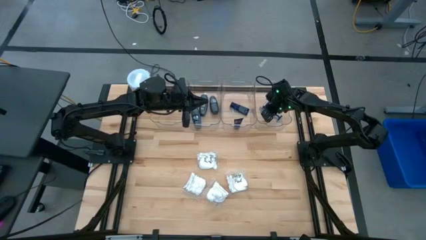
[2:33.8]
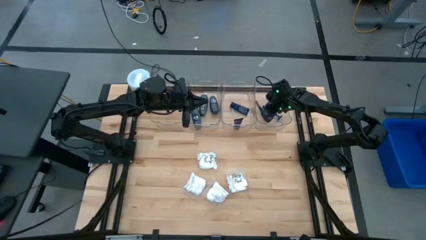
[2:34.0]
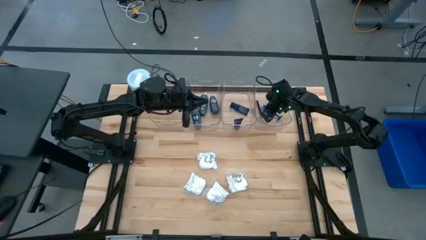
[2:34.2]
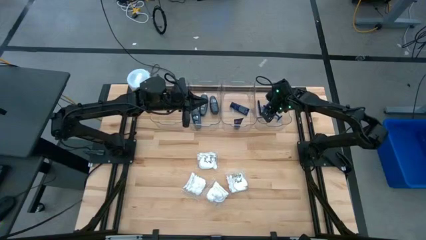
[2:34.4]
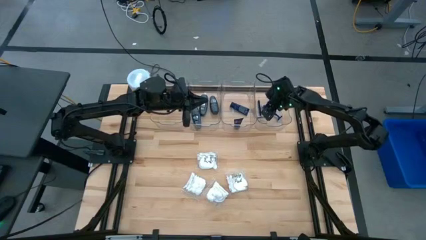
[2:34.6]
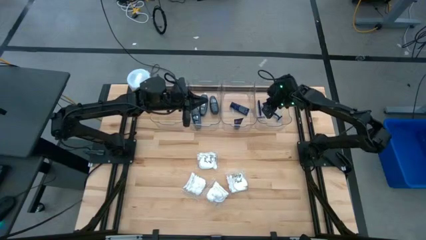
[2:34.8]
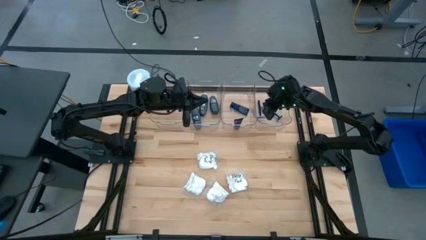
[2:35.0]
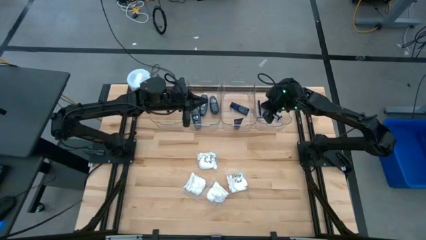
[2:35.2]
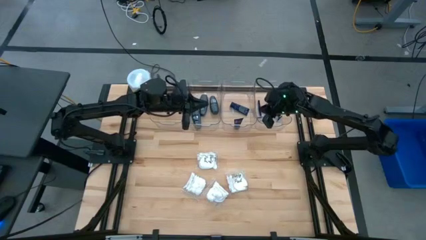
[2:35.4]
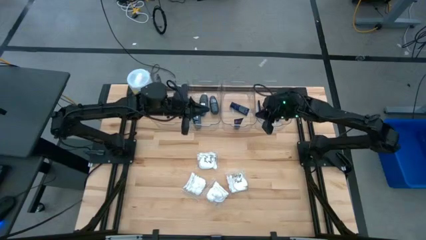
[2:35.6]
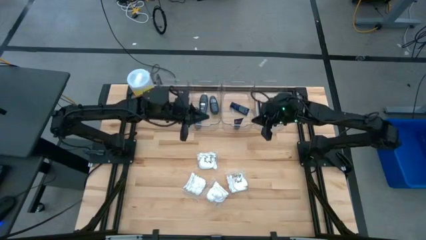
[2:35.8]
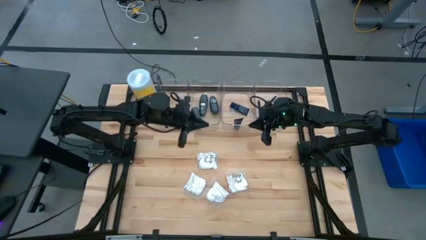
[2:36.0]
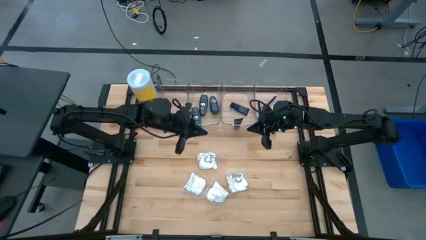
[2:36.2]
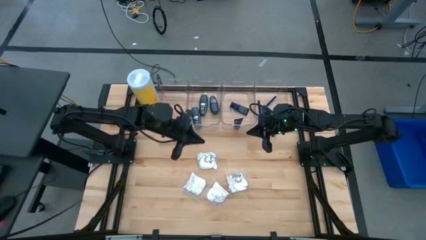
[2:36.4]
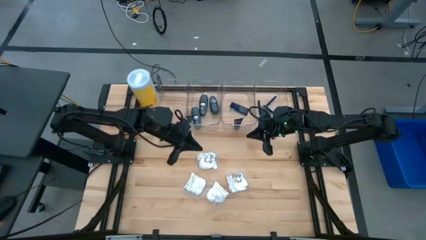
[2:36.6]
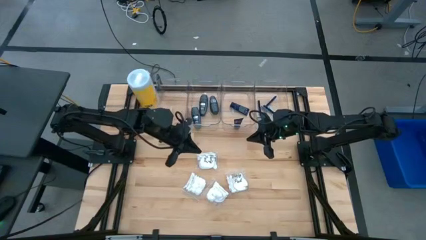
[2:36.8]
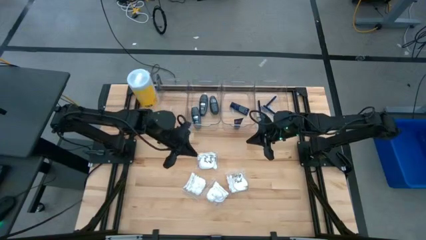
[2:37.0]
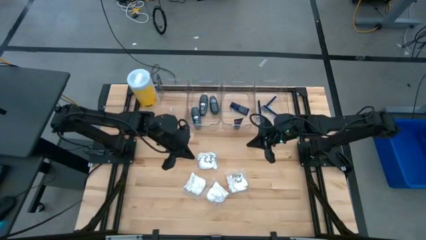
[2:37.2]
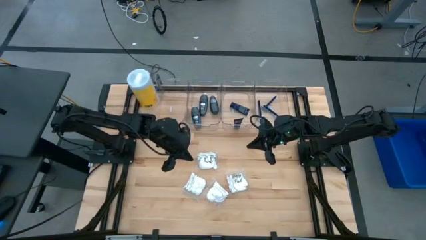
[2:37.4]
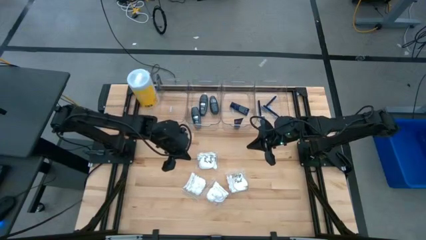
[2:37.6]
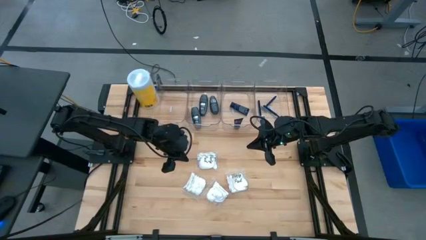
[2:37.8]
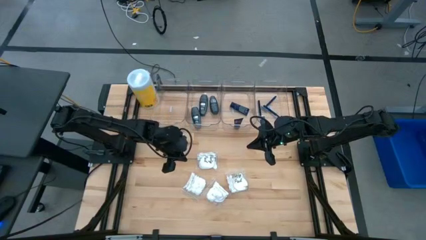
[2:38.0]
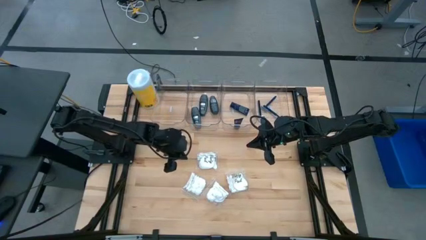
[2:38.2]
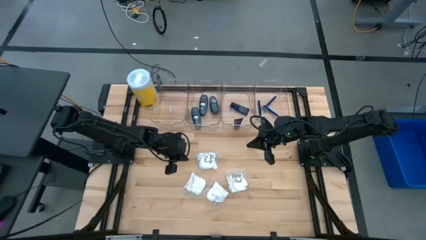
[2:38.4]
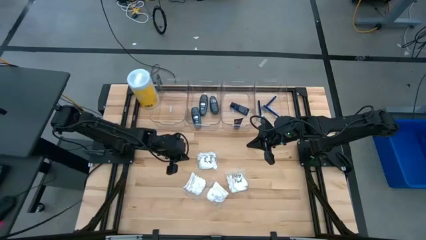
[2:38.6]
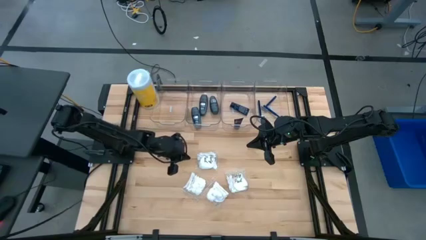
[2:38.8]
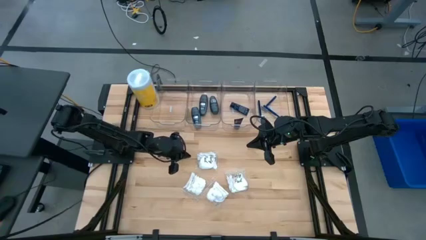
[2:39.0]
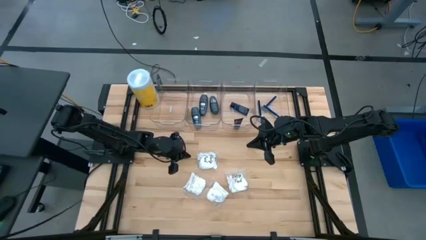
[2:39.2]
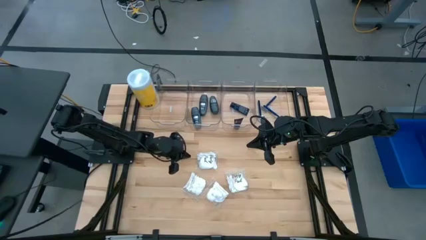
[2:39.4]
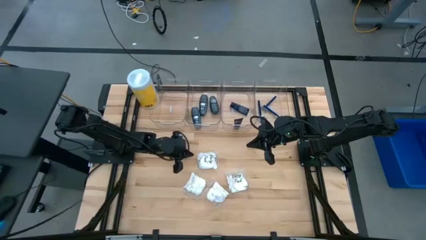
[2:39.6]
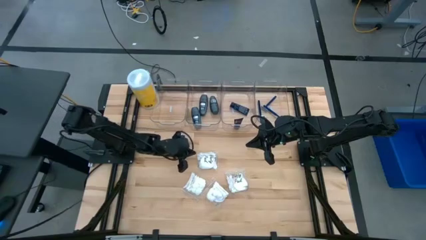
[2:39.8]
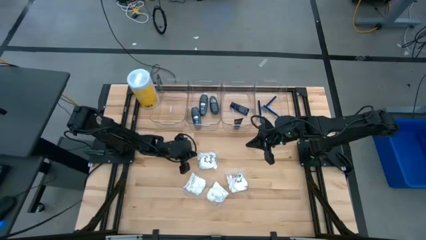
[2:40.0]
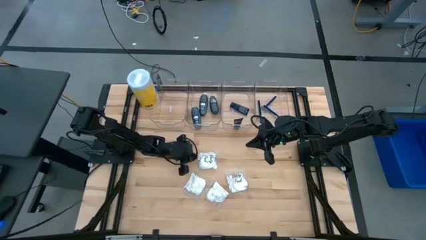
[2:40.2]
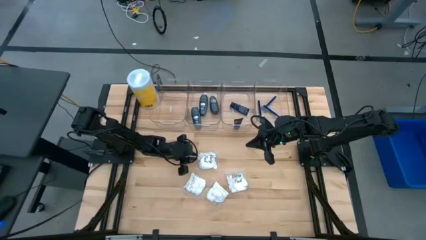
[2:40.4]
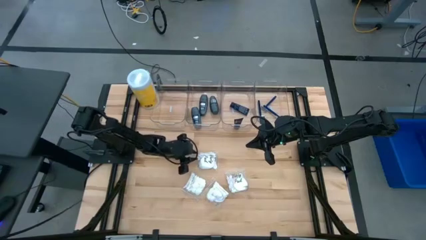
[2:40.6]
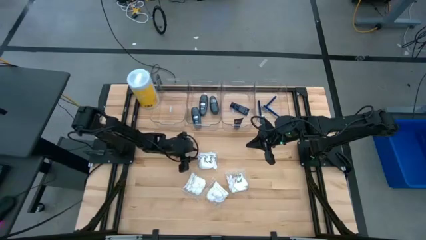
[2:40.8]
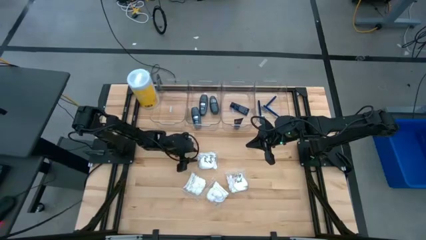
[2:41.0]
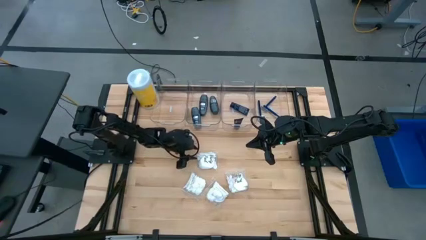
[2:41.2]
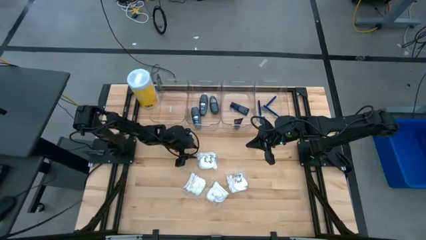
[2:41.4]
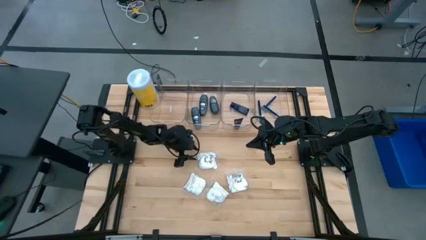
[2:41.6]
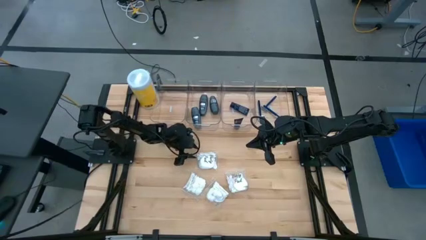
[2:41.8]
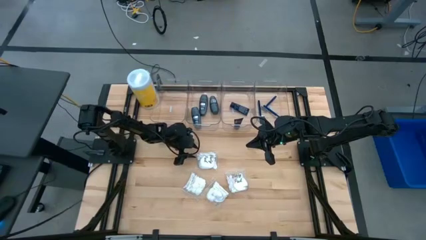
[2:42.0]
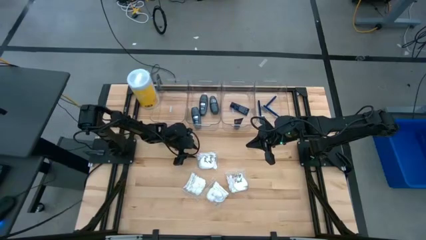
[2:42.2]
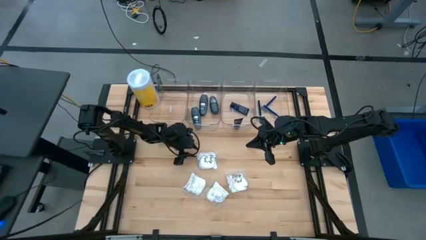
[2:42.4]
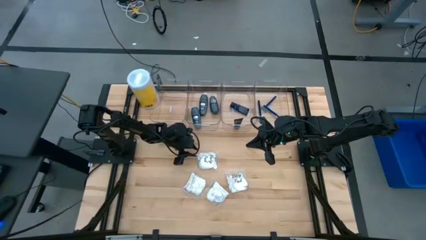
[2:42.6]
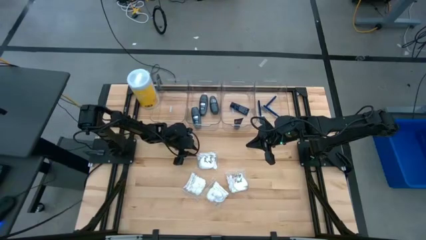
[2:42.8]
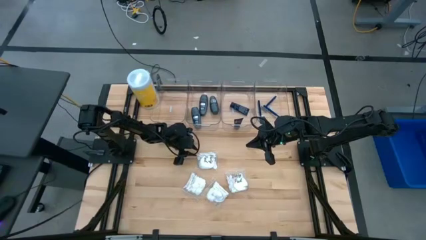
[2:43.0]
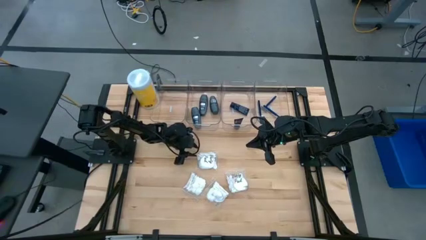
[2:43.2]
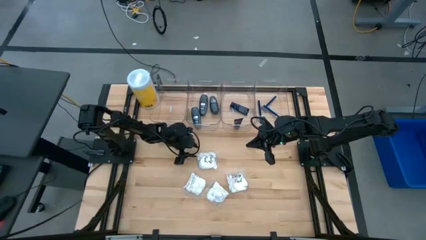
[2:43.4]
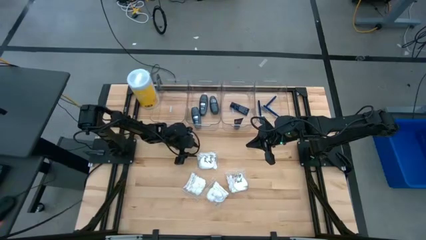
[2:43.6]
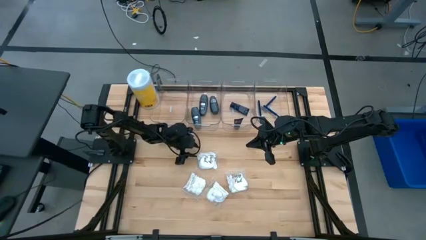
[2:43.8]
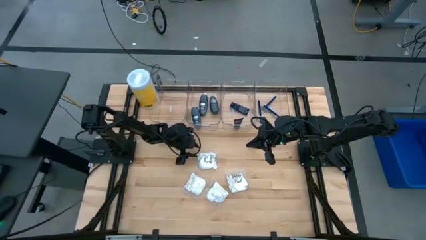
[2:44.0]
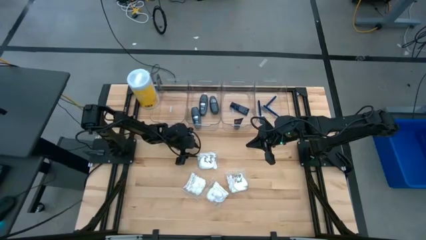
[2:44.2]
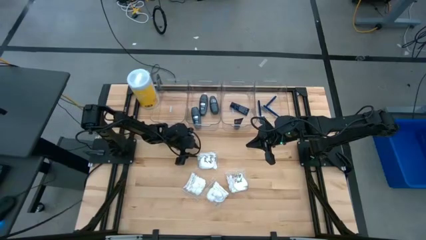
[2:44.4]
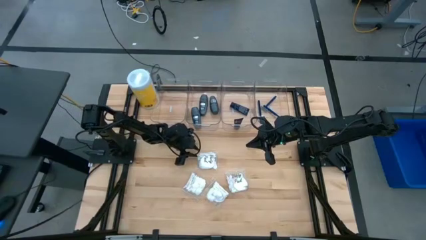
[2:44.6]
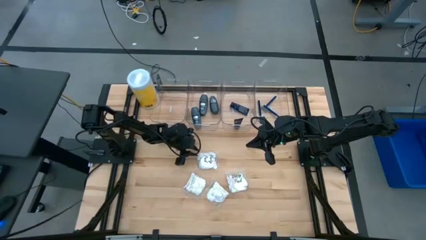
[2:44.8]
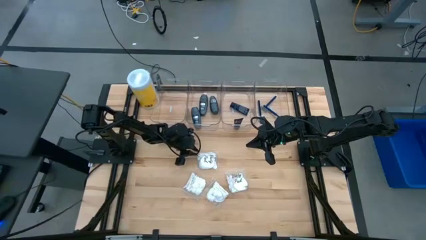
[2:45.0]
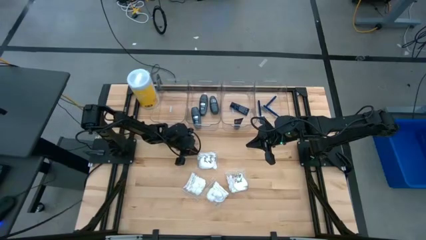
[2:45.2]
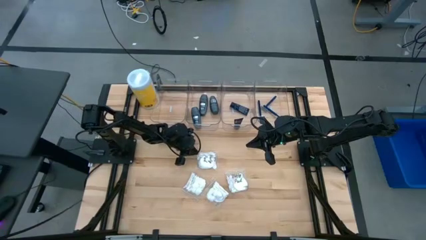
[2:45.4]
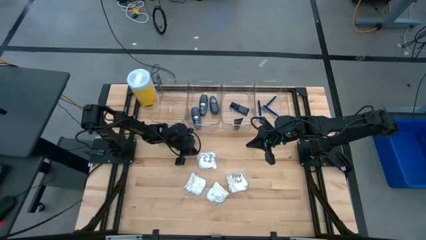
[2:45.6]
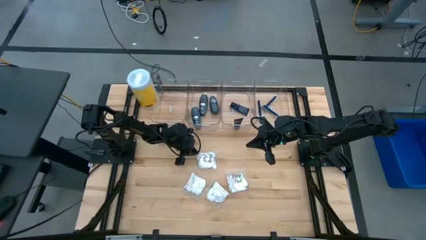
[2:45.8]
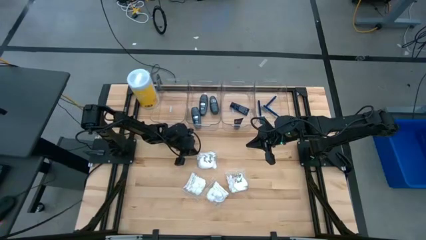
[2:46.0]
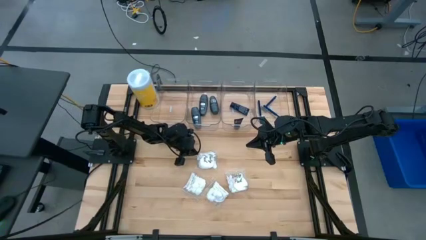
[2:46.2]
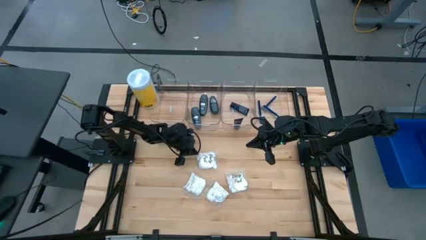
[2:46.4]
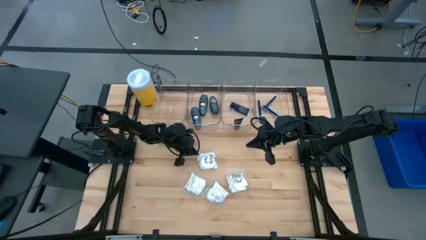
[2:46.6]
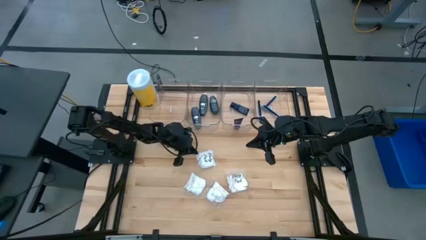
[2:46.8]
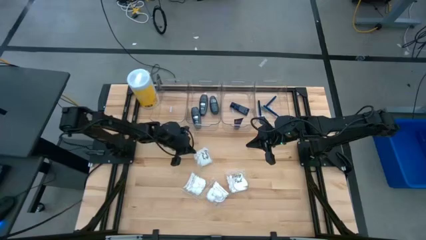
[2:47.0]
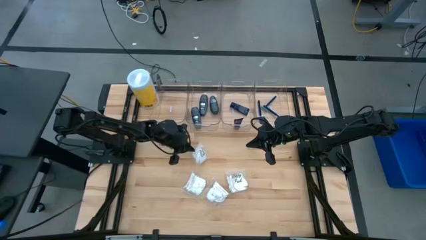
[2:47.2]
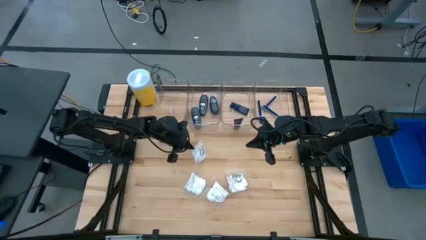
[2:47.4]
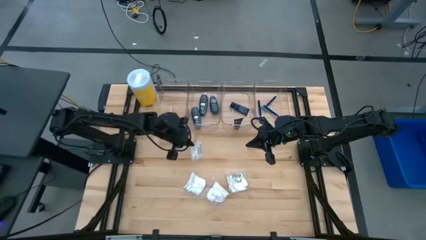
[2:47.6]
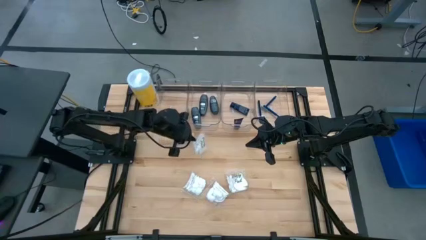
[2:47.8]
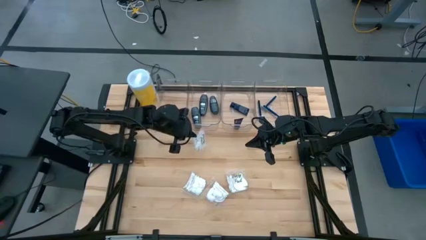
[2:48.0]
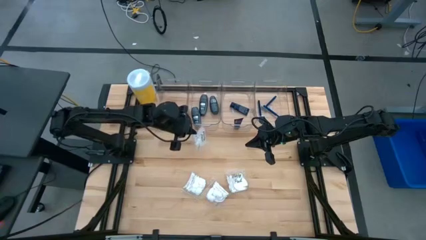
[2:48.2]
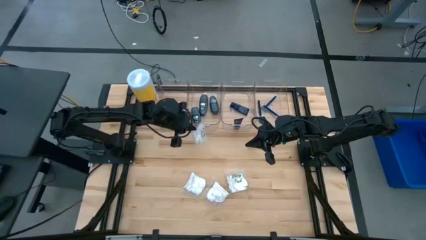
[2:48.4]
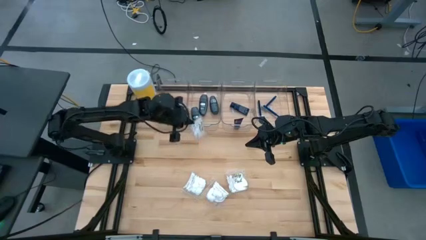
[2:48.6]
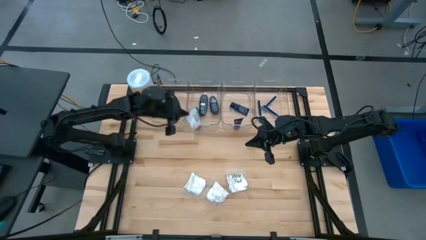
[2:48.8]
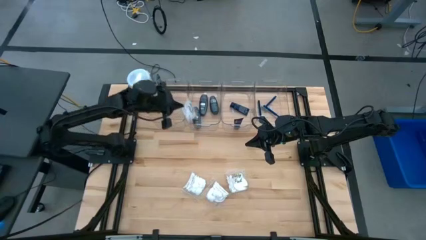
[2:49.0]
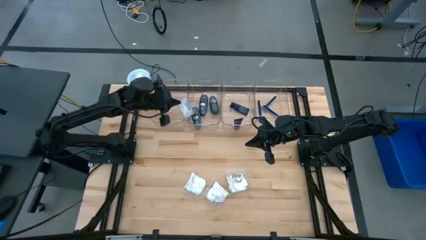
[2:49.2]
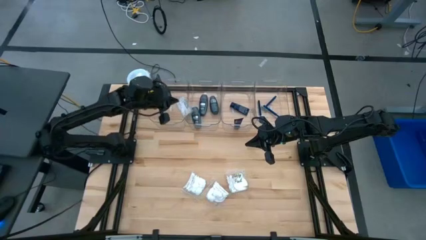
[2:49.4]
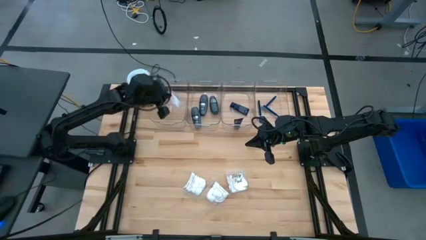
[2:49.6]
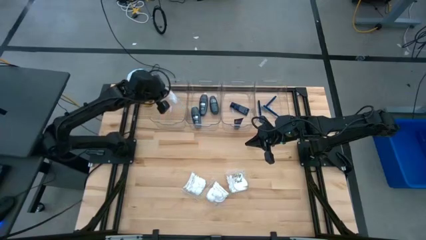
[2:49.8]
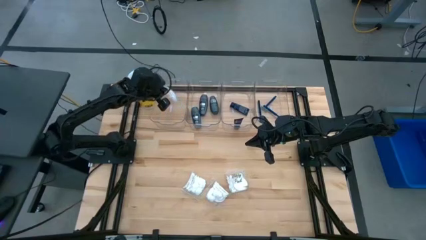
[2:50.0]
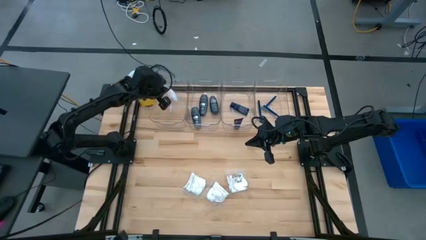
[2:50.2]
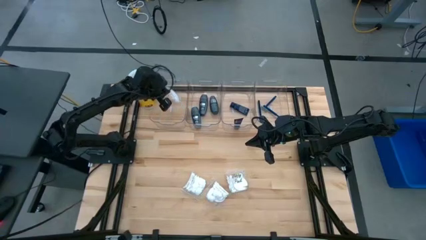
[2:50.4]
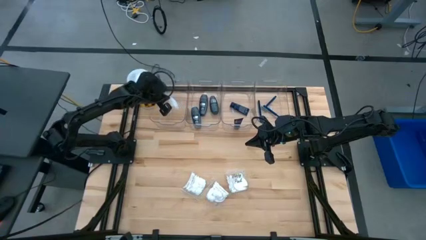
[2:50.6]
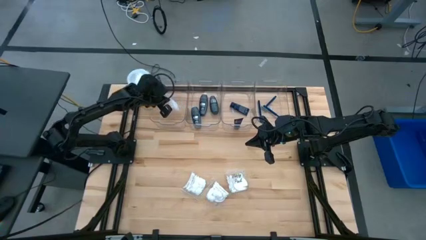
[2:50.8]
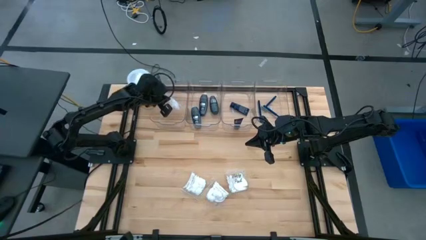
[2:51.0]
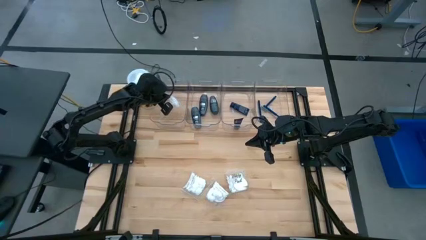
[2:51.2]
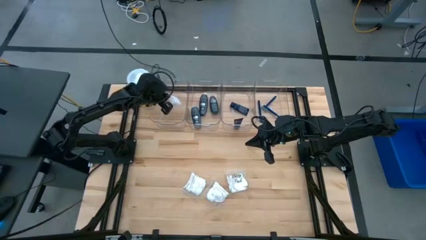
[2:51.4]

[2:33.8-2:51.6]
Task: Pick & Place Travel size toiletries
Put the white cotton pack into the left transparent bin
